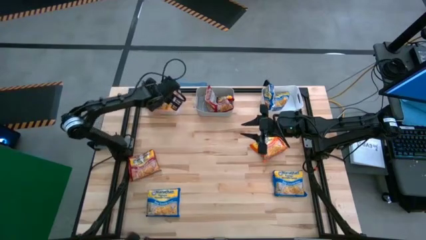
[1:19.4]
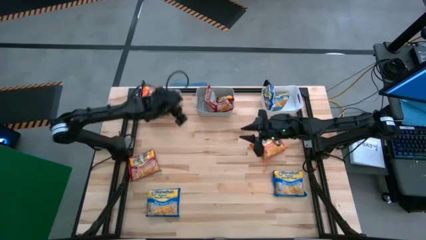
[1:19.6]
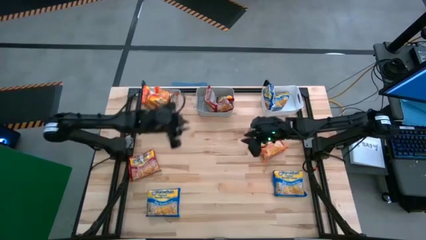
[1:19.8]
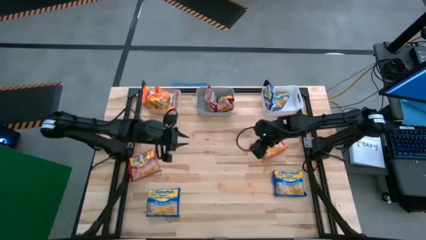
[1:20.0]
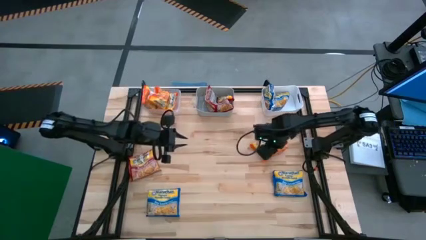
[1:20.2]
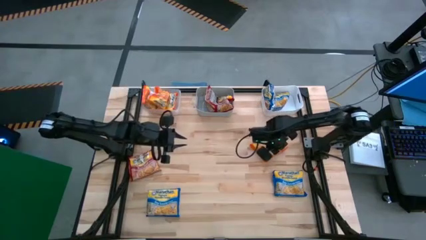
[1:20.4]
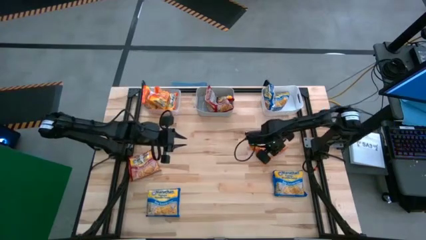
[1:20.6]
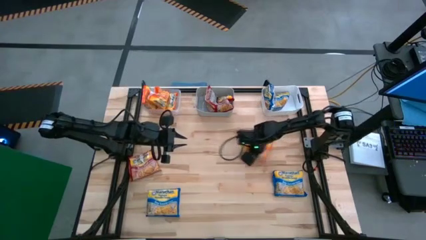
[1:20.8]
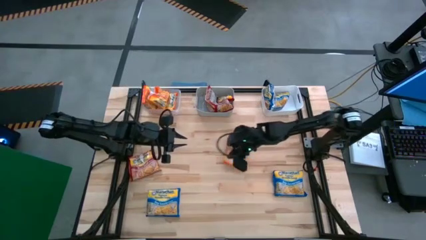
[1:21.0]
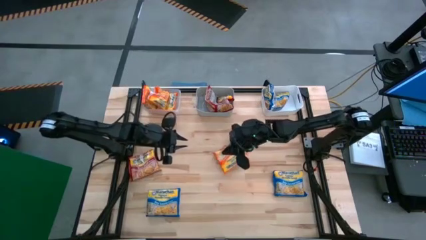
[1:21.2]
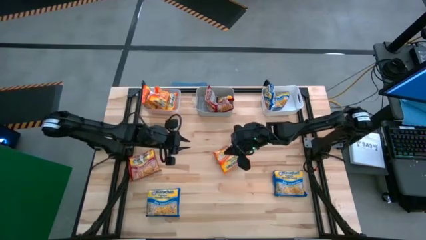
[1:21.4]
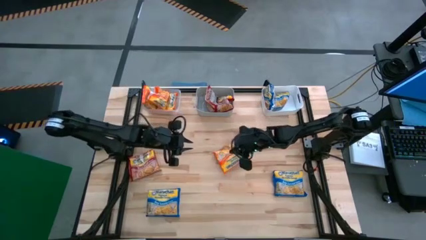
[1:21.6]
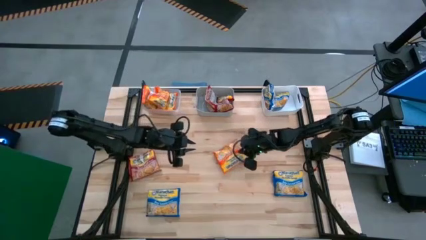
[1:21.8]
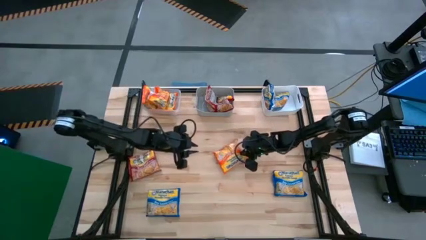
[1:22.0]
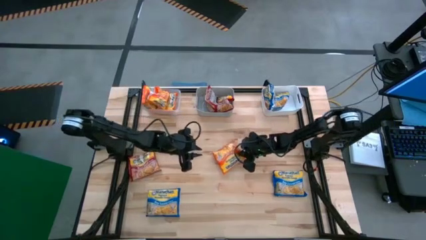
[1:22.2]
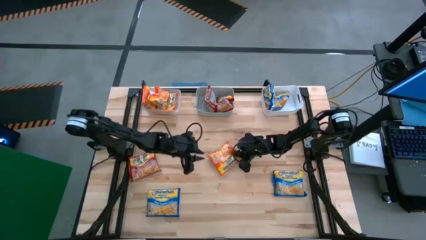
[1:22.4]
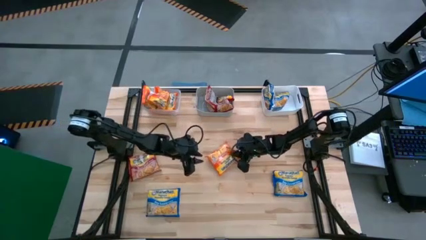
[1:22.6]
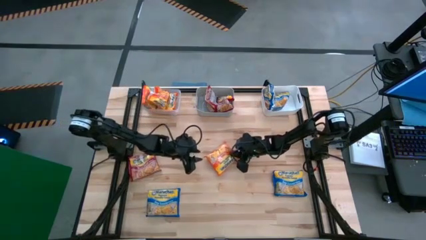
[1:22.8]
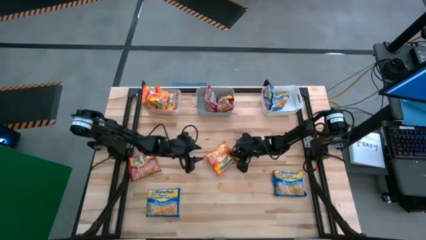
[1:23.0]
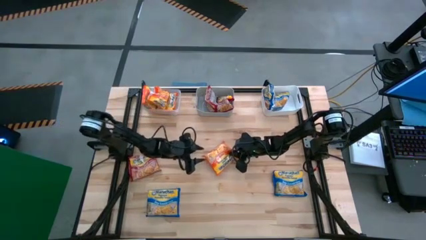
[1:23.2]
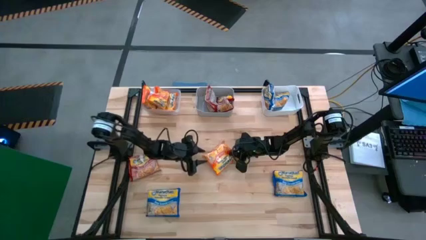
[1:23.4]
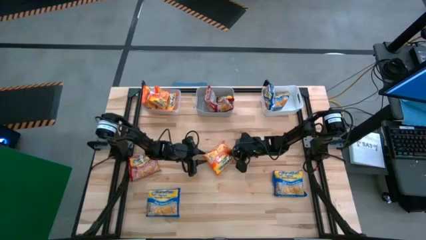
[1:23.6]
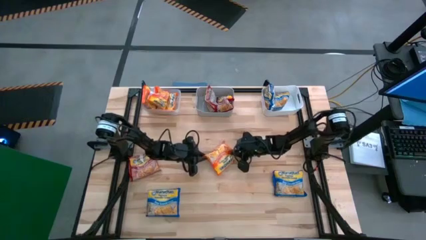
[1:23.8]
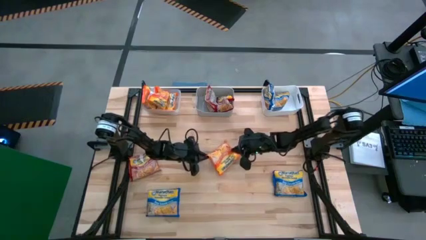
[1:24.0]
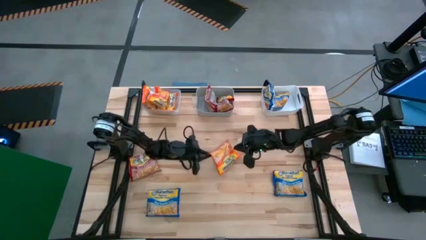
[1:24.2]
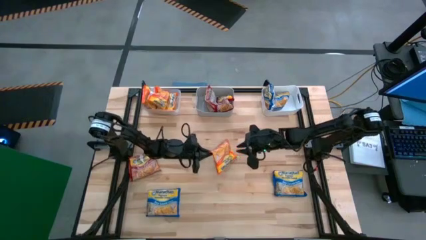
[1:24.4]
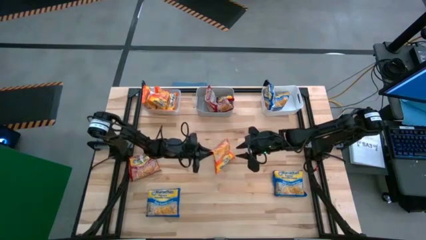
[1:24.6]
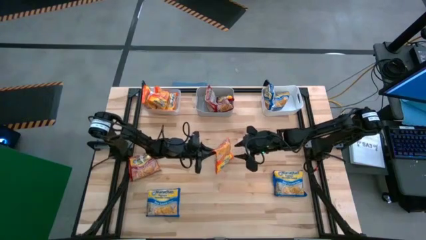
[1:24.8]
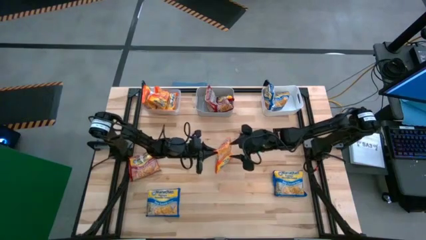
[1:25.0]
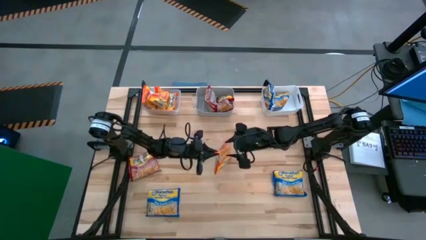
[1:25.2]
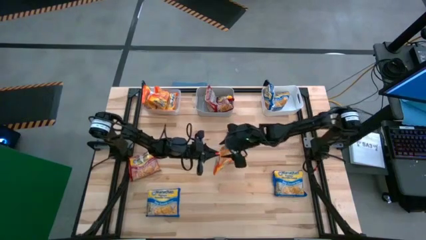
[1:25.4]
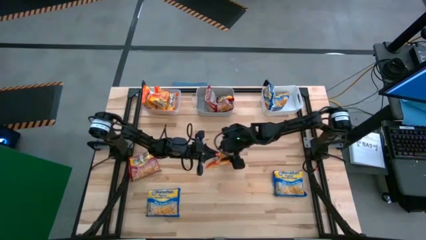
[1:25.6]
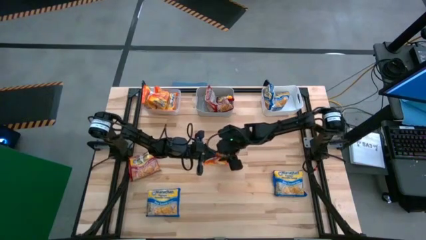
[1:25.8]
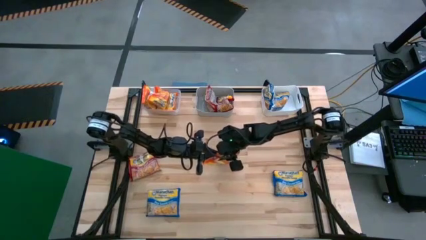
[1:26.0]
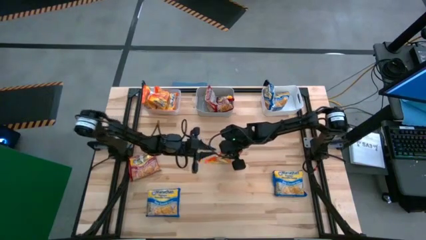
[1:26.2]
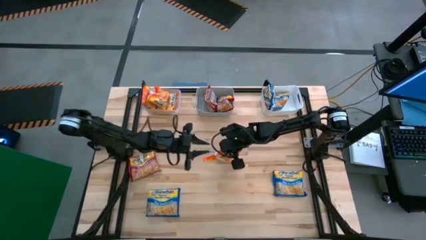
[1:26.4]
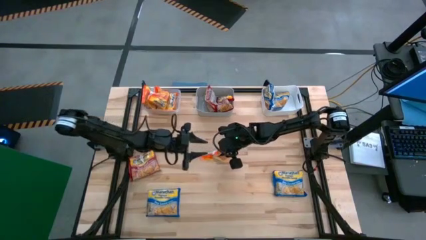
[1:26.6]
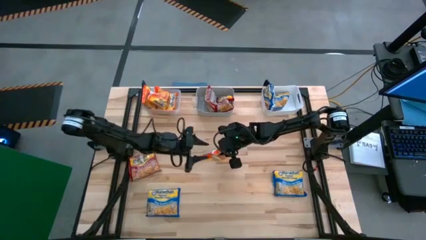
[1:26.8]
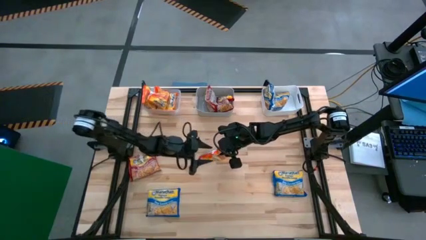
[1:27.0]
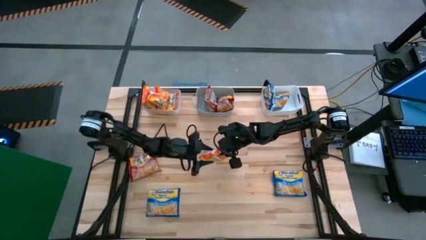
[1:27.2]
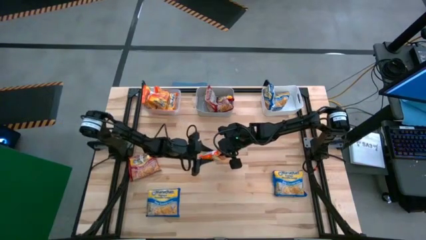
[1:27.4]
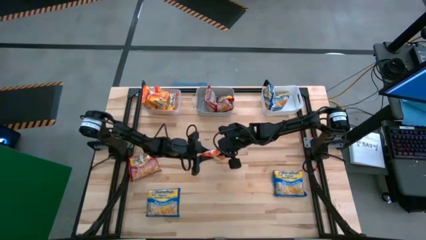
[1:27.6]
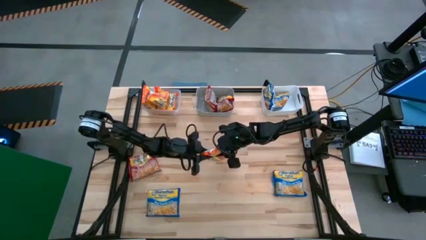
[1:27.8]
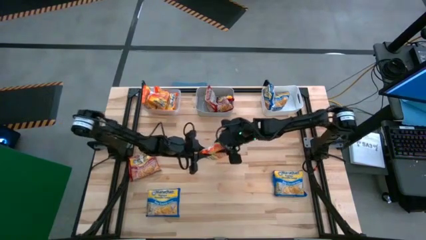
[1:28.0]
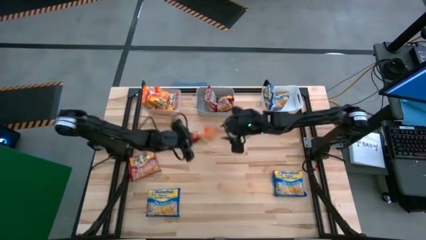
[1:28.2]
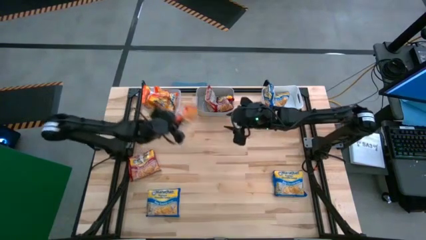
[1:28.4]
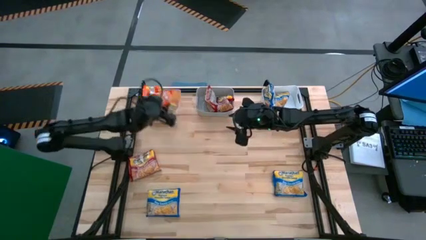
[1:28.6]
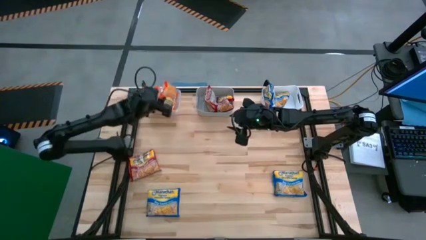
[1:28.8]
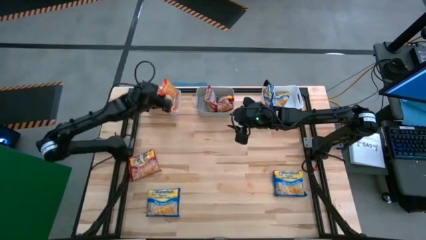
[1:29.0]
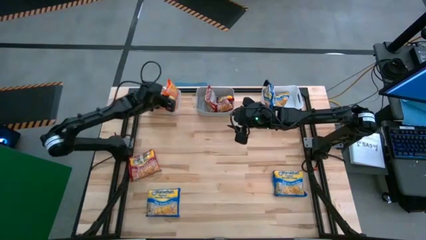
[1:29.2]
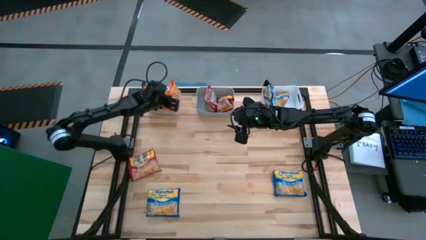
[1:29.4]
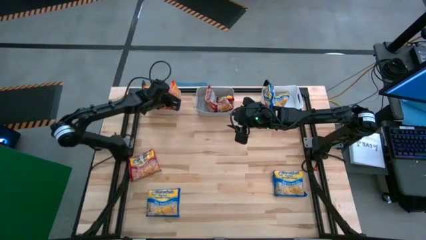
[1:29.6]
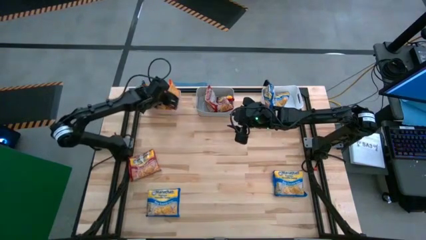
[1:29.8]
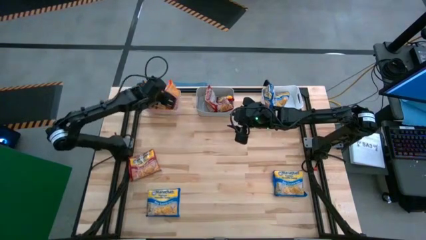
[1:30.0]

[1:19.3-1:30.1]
Task: Sort Maruchan noodles
Put the orange noodle pack into the transparent bin

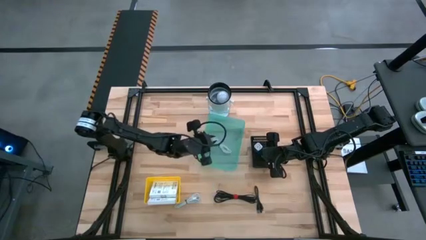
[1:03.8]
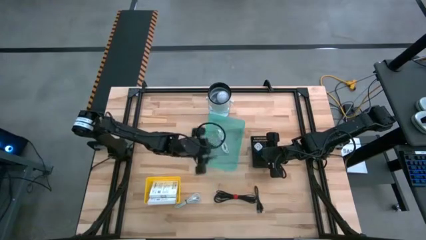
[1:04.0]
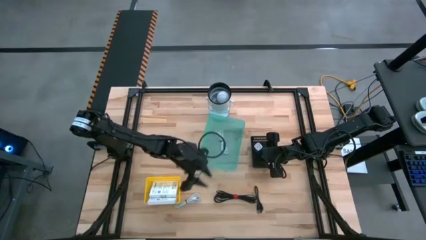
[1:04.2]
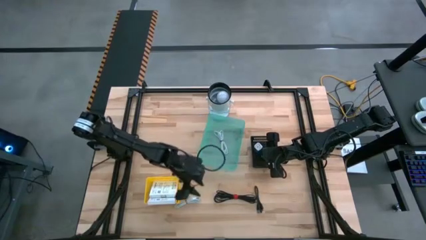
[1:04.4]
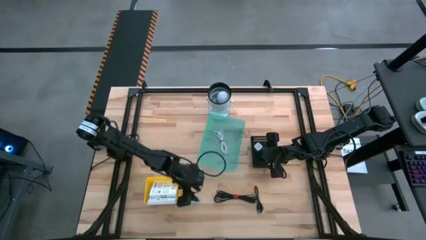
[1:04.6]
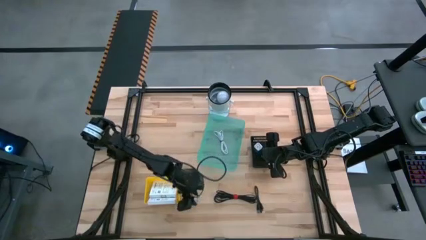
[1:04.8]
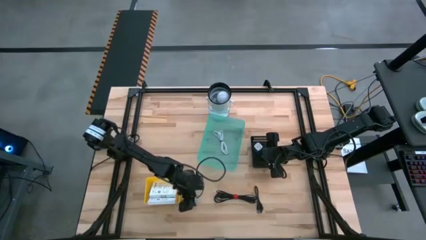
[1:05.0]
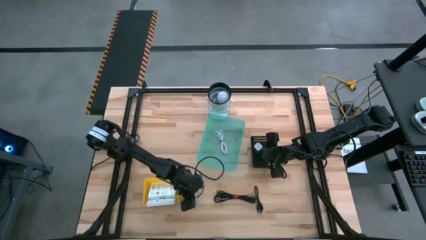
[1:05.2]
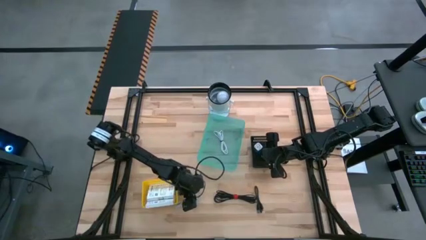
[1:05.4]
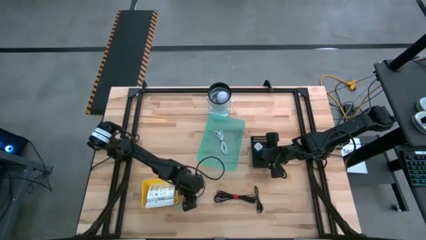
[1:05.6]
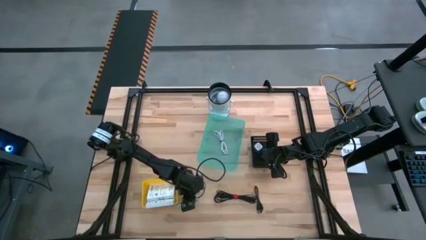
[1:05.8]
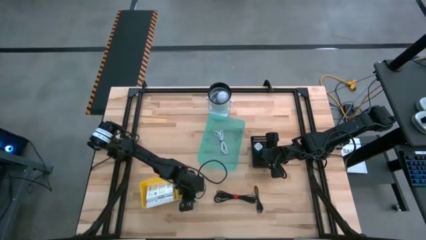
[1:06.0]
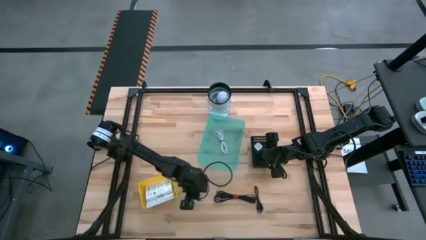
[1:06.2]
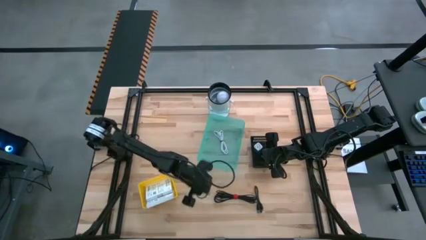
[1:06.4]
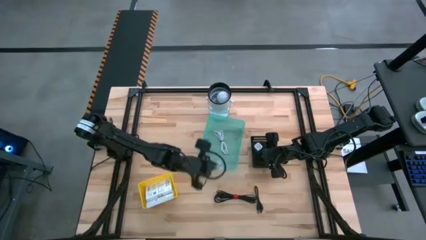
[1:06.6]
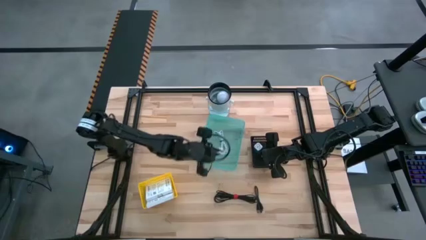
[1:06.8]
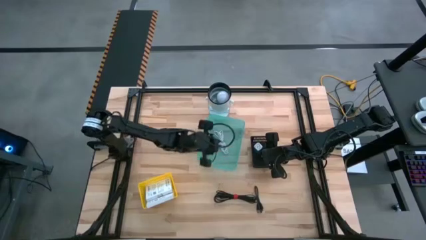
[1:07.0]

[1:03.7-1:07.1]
Task: Pick and place items into bin
Put the white charger cable into the green bin

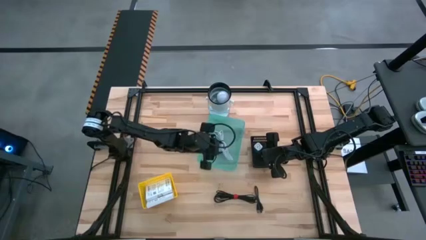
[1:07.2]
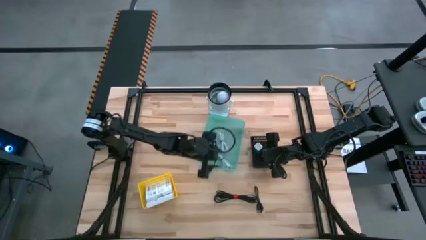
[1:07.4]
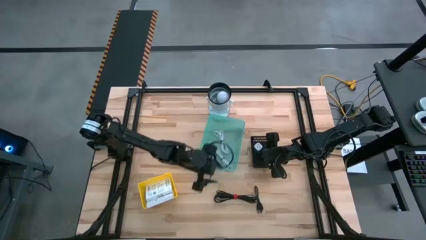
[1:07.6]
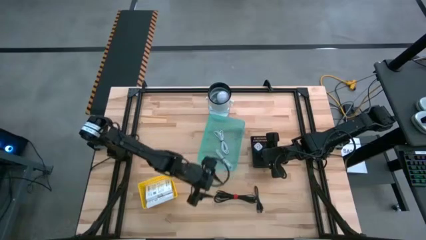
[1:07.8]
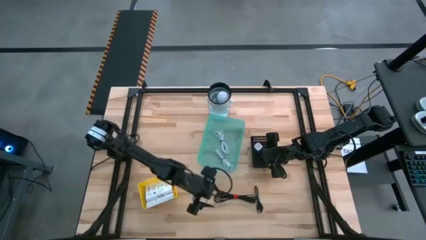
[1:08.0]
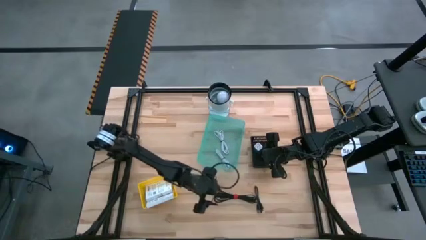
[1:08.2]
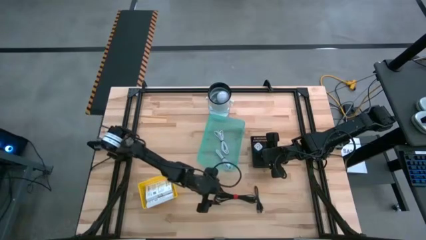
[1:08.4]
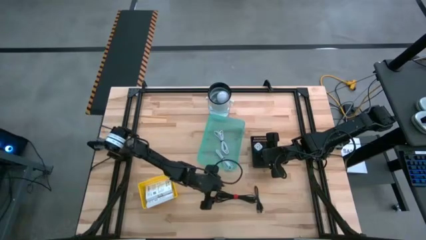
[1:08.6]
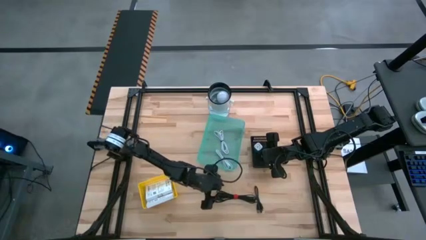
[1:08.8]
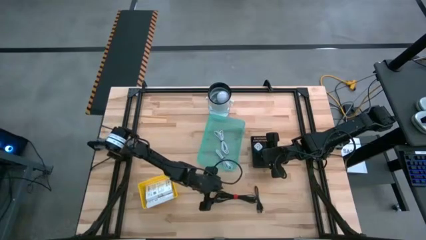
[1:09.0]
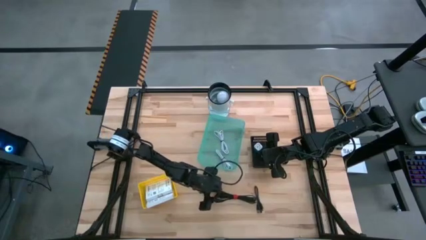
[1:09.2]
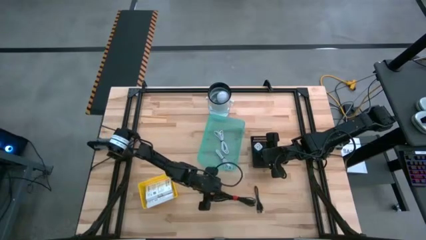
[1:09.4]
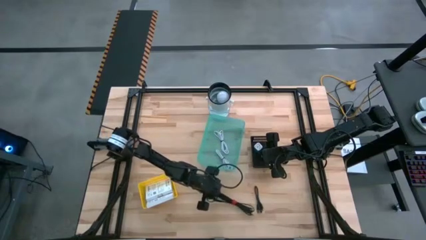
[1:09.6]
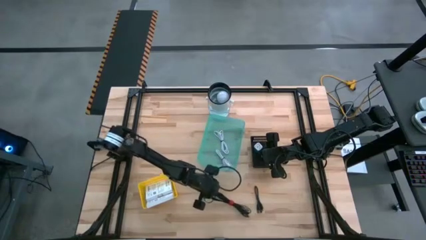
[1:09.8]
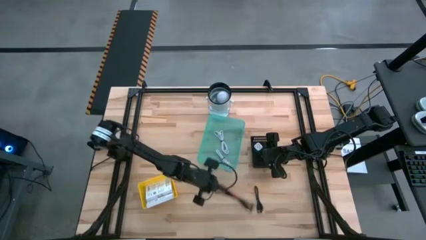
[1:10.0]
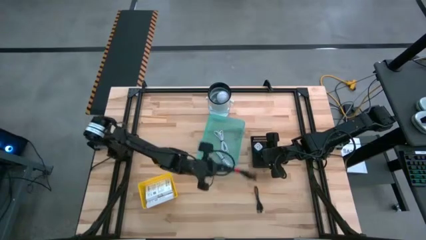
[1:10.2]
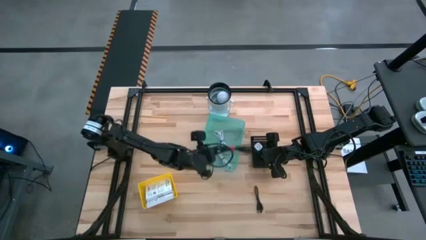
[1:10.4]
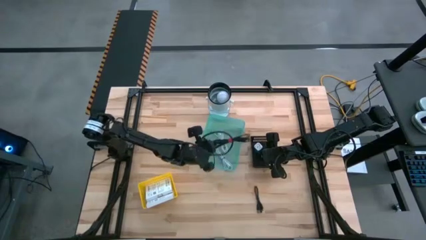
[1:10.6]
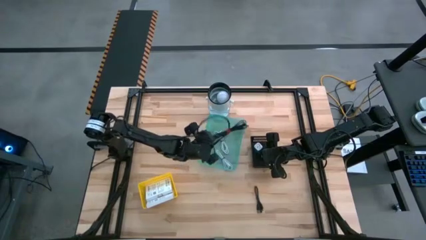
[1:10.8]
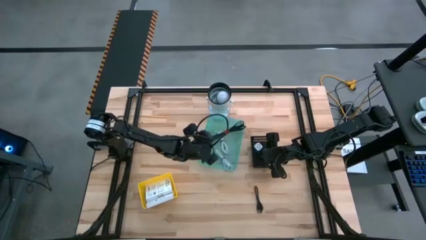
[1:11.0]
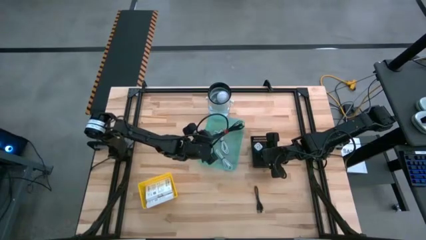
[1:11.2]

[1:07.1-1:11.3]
Put the left black charger cable into the green bin
